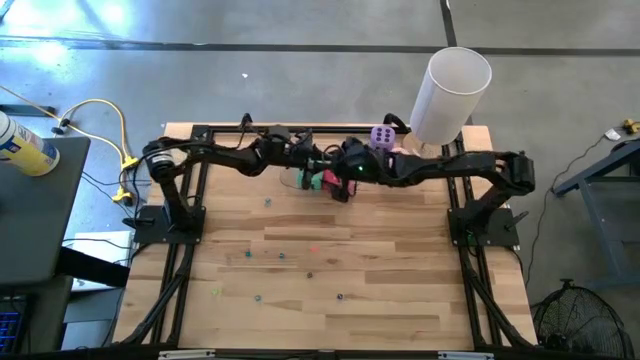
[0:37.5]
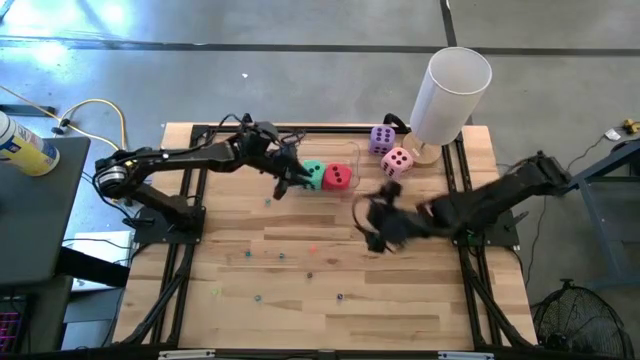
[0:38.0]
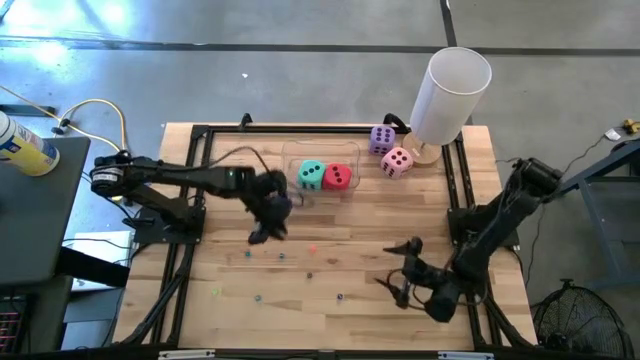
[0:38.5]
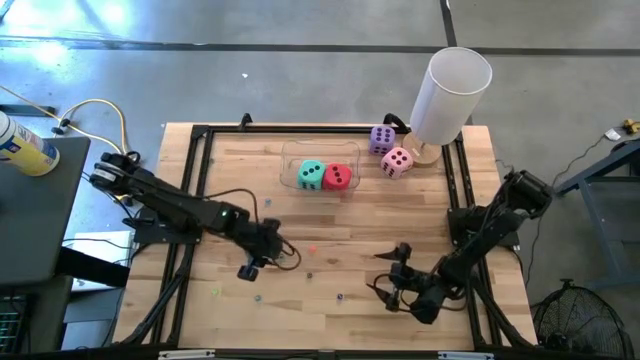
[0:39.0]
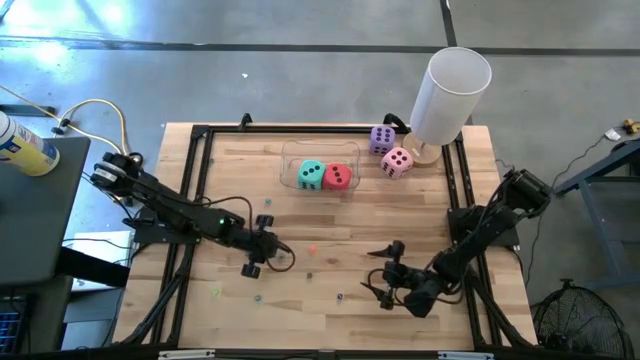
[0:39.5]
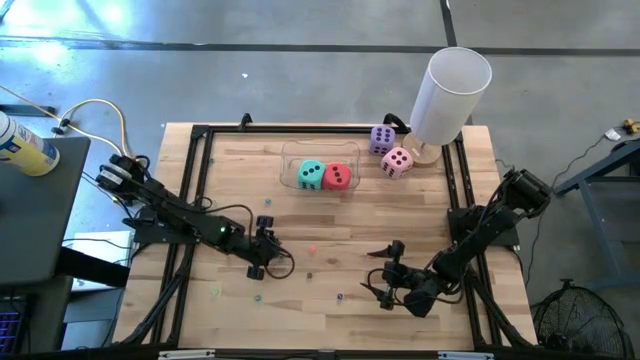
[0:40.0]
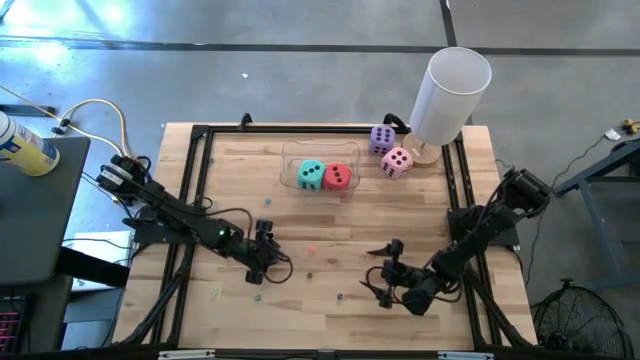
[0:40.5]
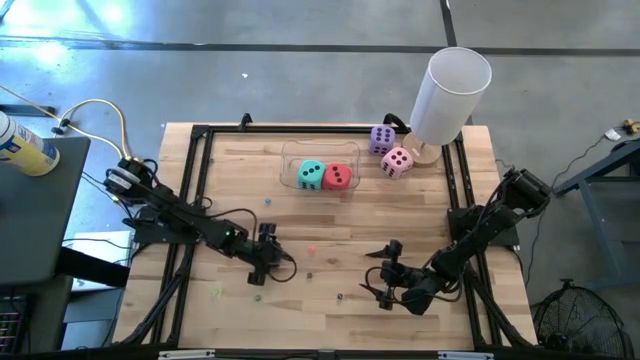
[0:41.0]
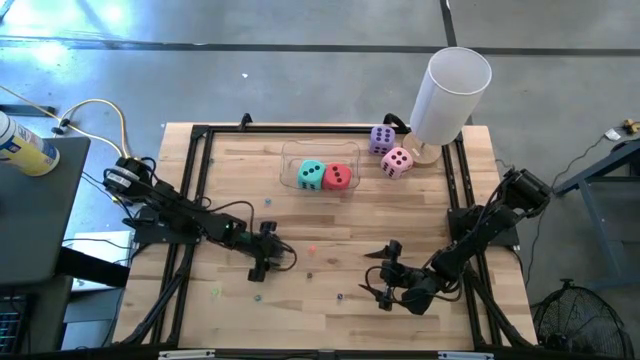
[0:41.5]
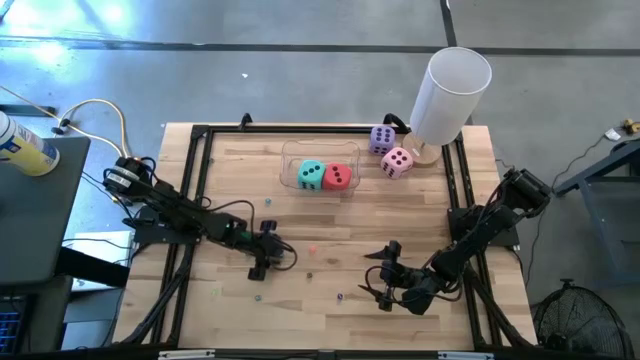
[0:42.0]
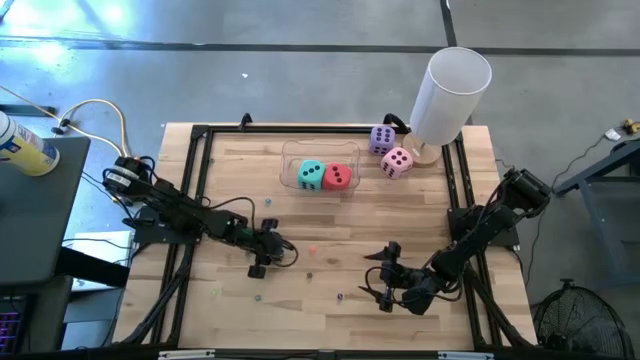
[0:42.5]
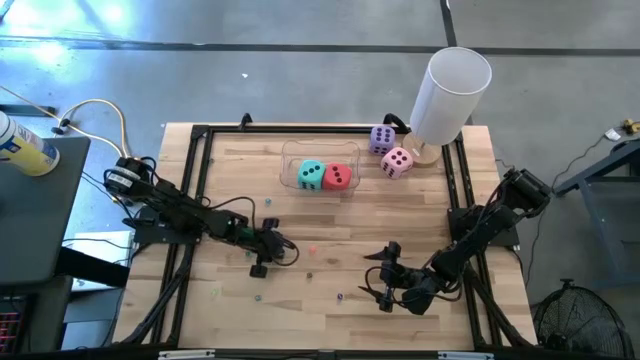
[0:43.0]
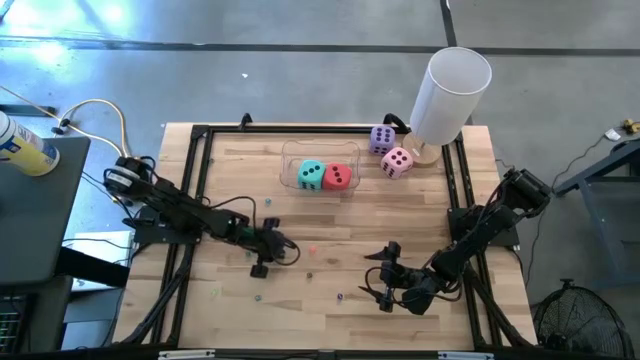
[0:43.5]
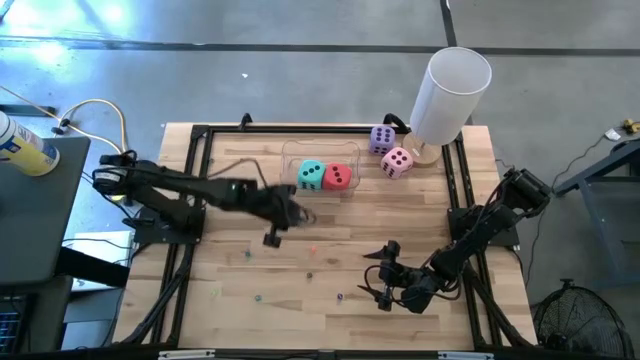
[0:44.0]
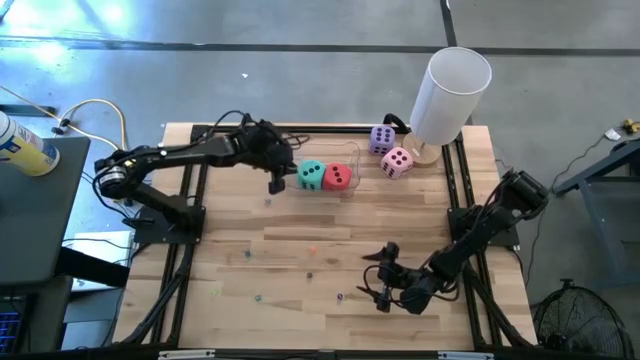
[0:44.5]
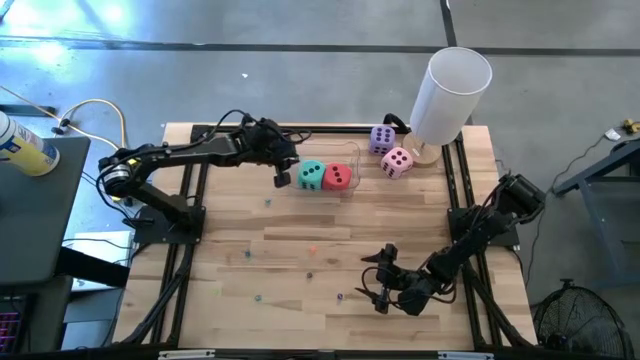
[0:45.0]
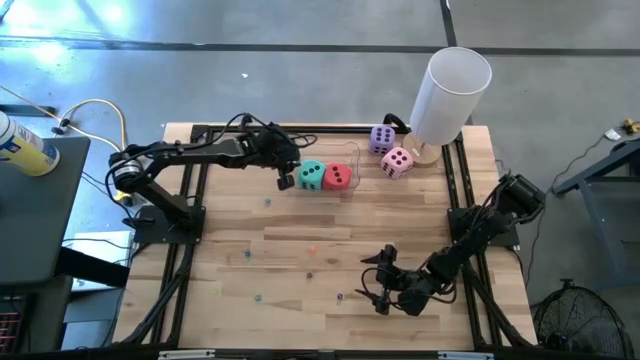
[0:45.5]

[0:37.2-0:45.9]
Task: Pick & Place Dice
Put the small light blue dice into the transparent bin

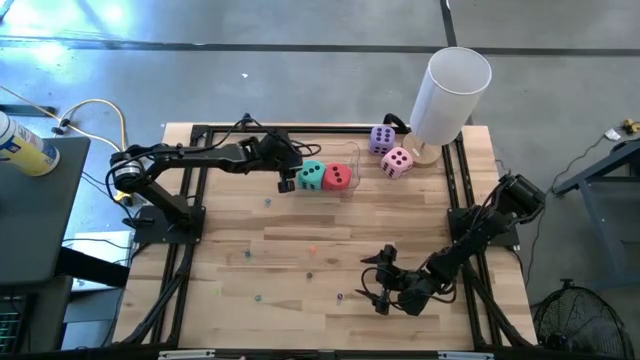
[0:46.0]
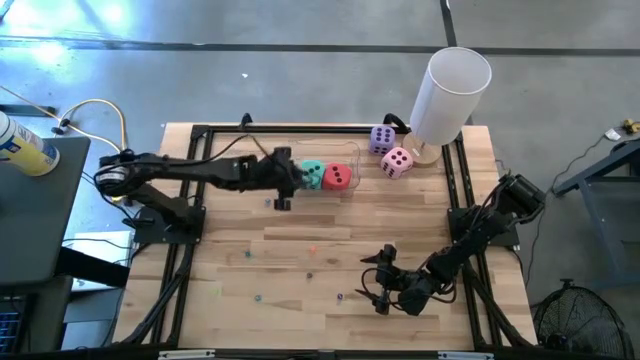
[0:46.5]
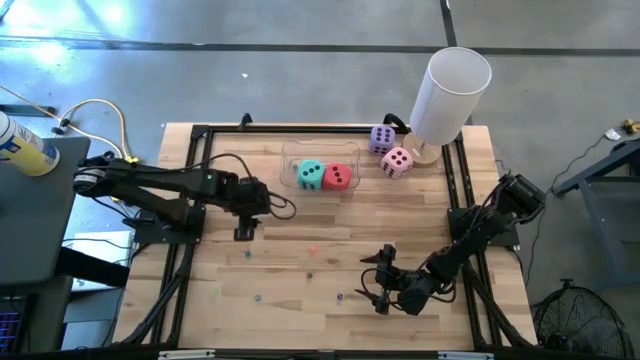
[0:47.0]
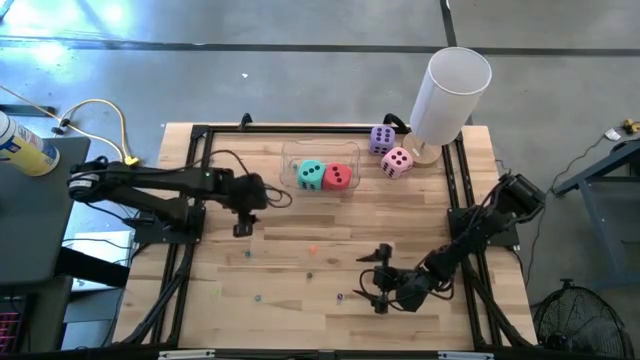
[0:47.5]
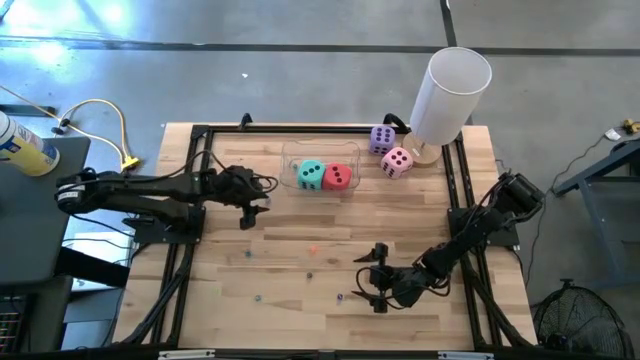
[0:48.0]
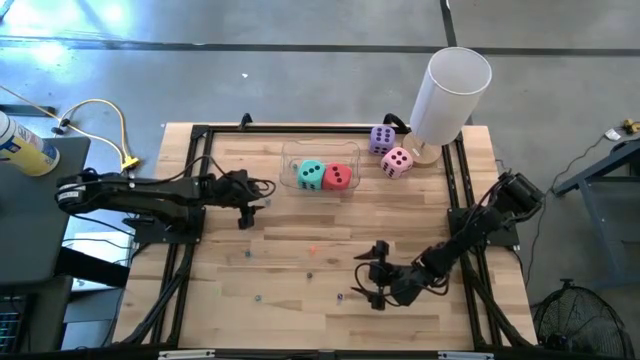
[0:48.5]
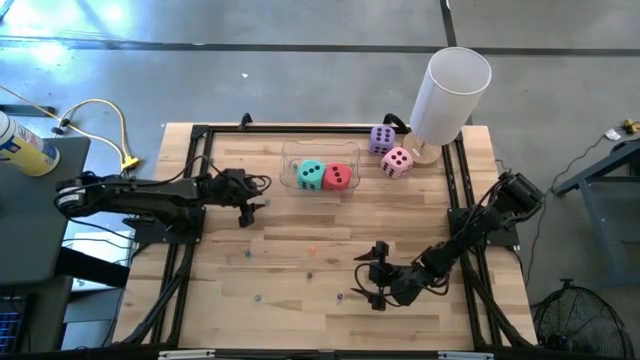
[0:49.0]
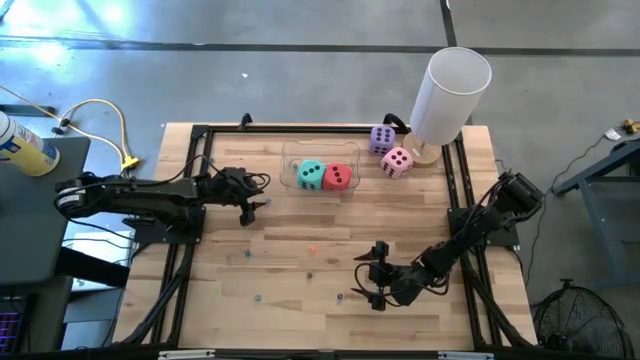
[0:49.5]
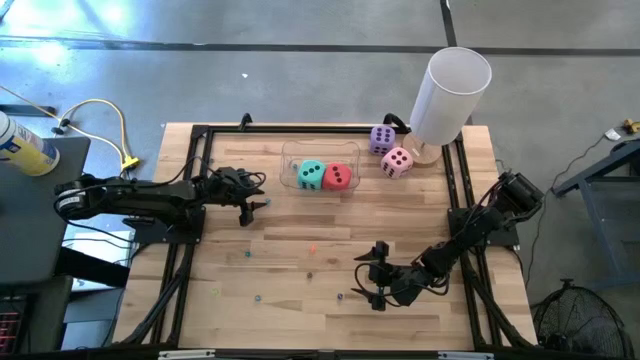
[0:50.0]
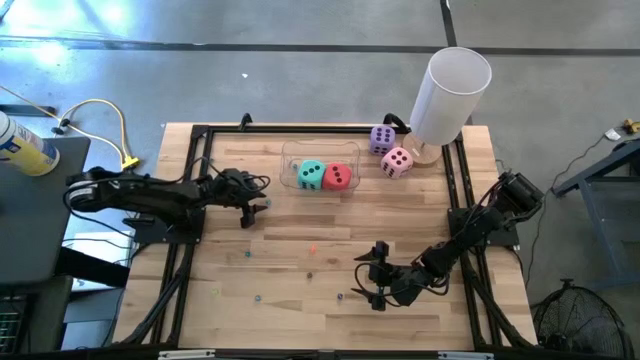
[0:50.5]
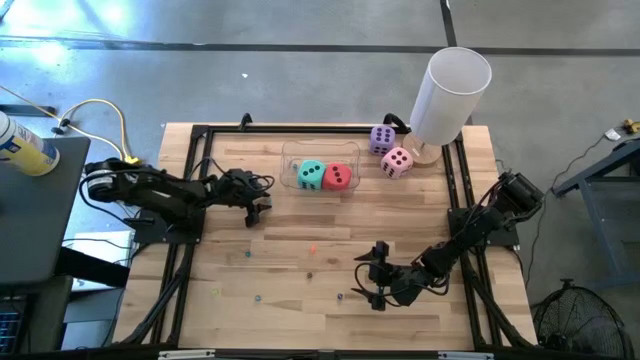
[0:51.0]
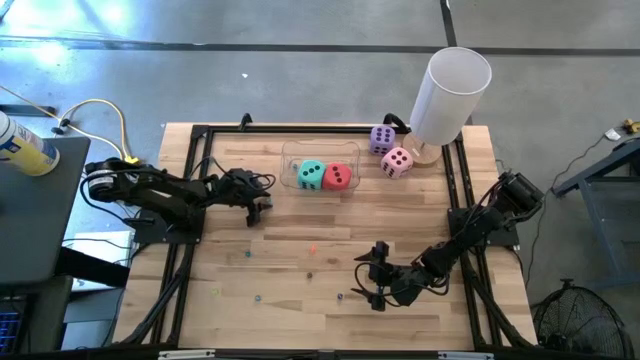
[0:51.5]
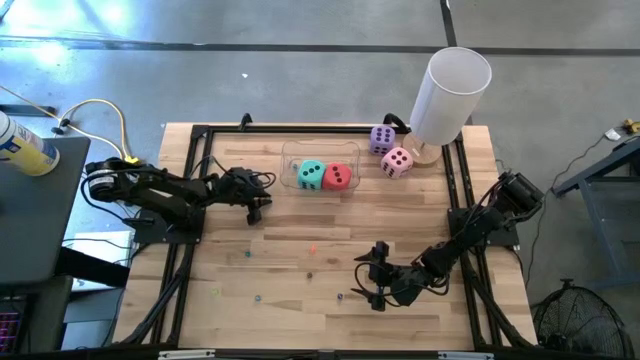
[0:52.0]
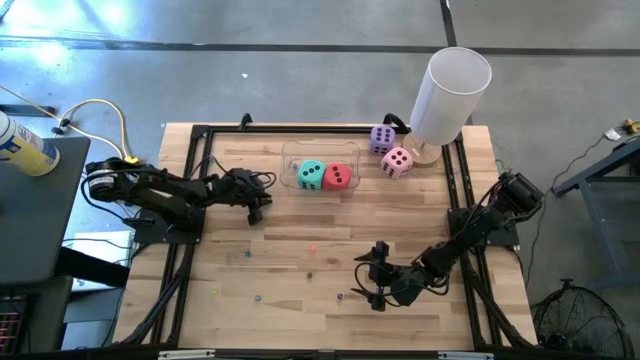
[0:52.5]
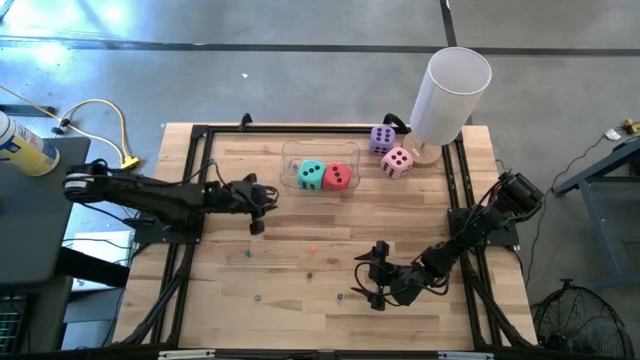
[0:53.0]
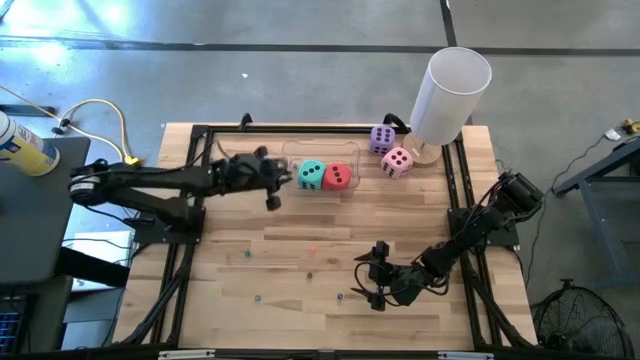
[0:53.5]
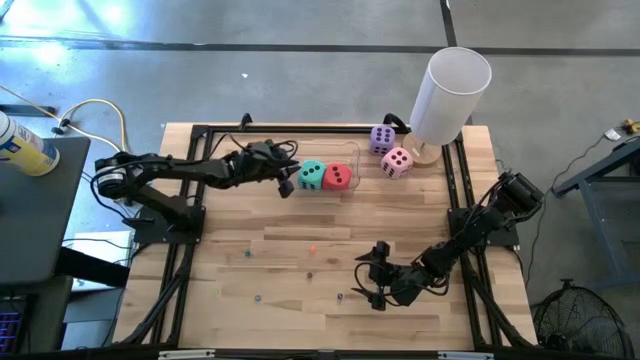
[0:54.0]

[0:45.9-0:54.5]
Put the small light blue dice into the transparent bin

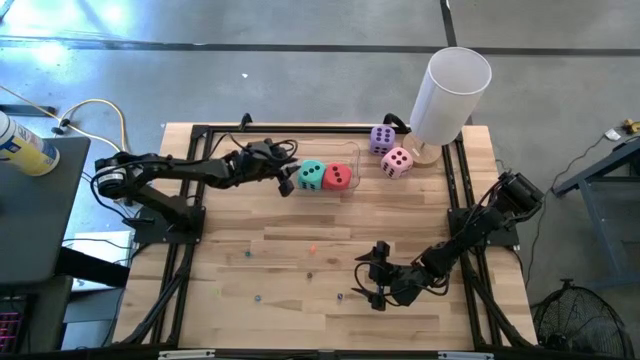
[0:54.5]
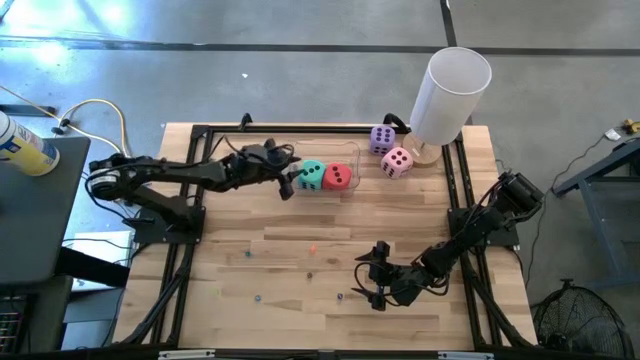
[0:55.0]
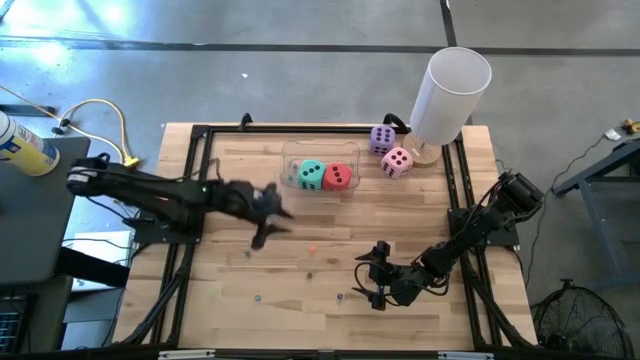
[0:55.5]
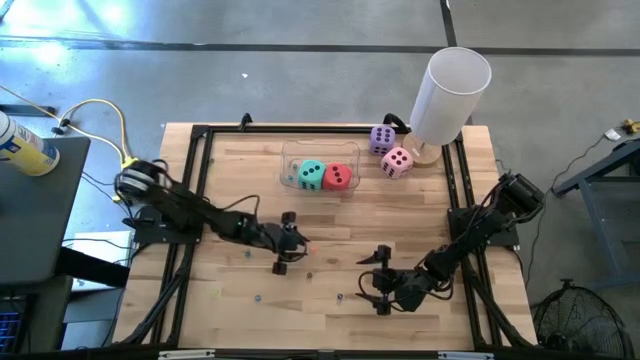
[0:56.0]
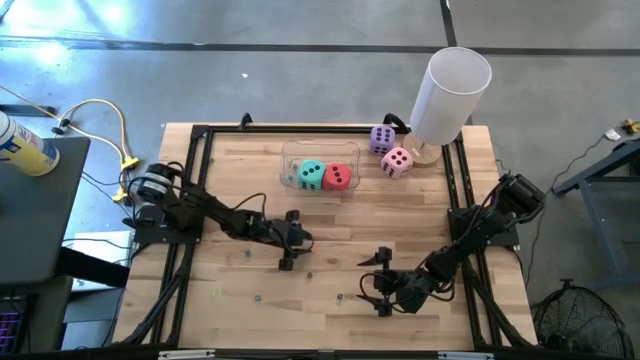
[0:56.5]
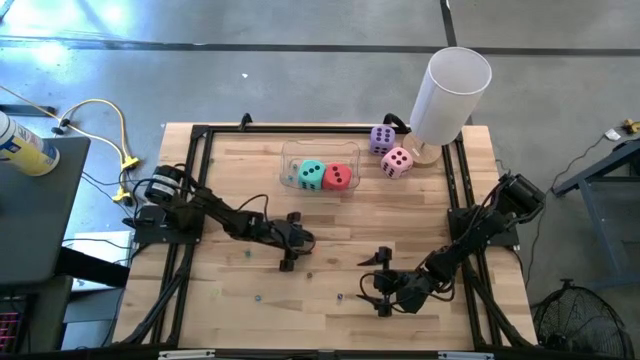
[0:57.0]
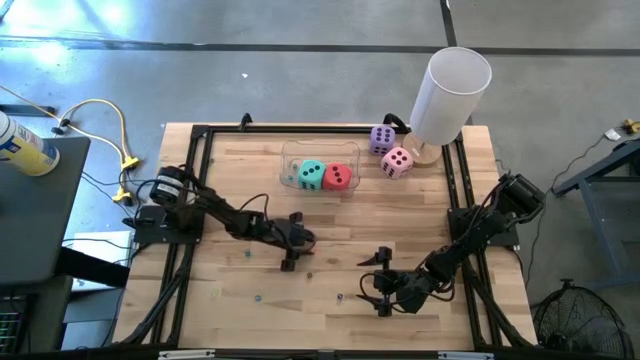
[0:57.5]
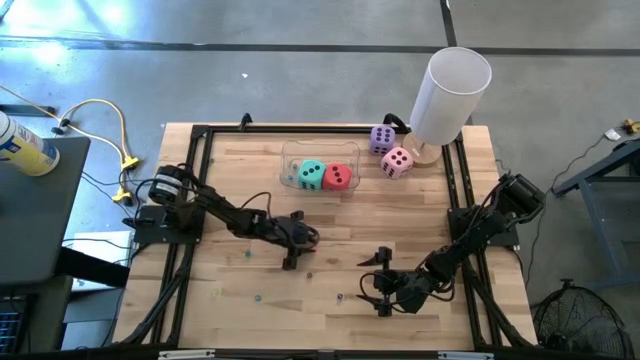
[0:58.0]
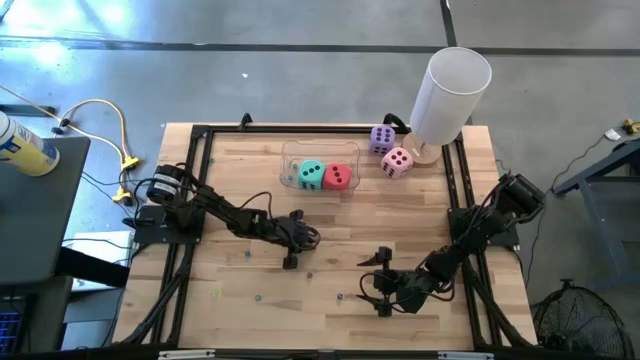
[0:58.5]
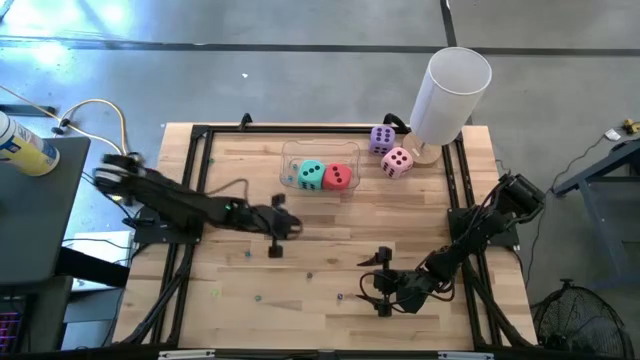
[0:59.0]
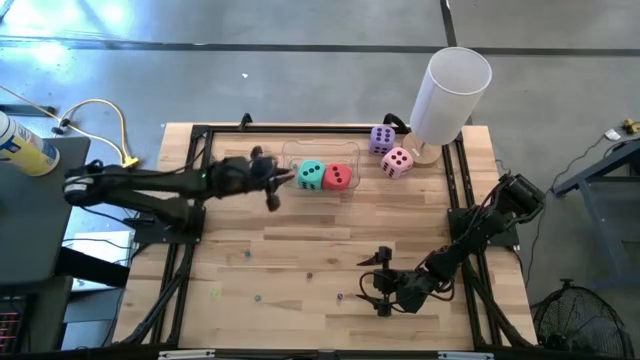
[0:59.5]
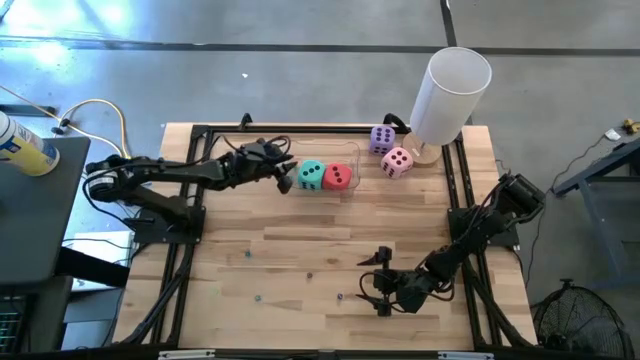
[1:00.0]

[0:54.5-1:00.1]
Put the small orange dice into the transparent bin
